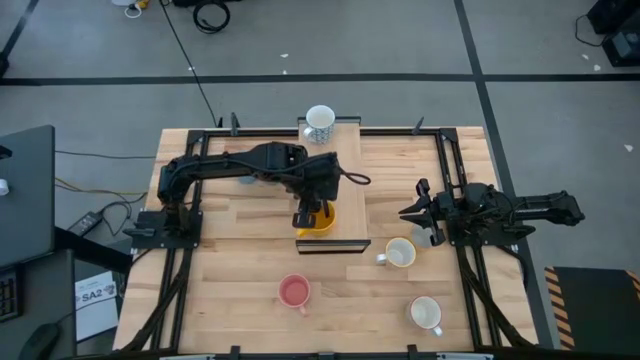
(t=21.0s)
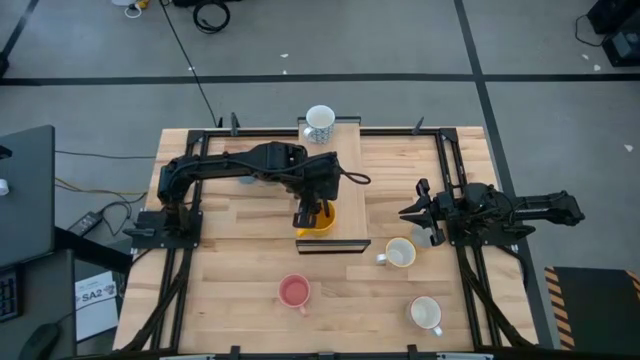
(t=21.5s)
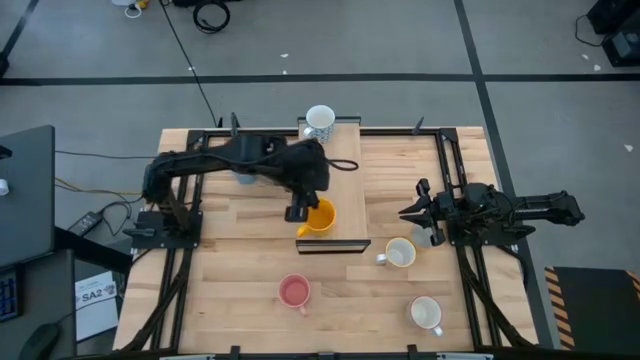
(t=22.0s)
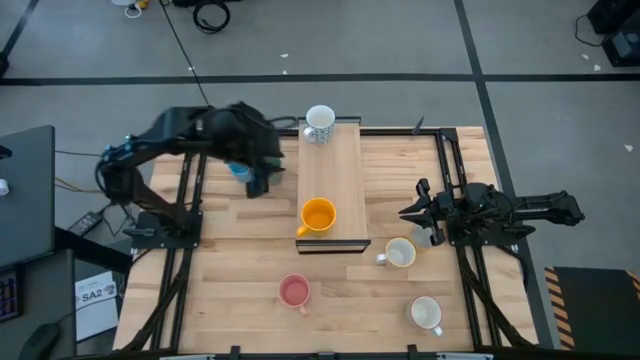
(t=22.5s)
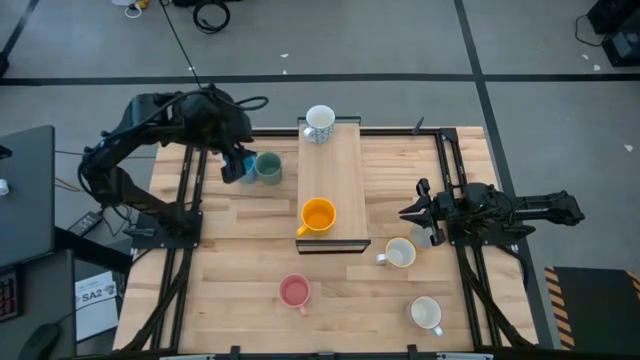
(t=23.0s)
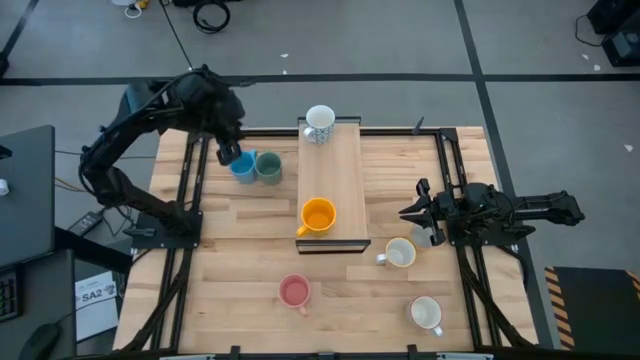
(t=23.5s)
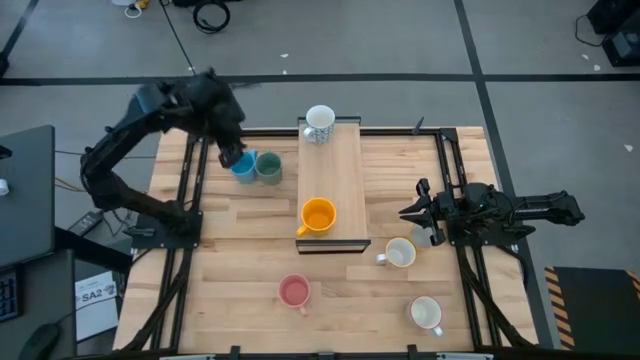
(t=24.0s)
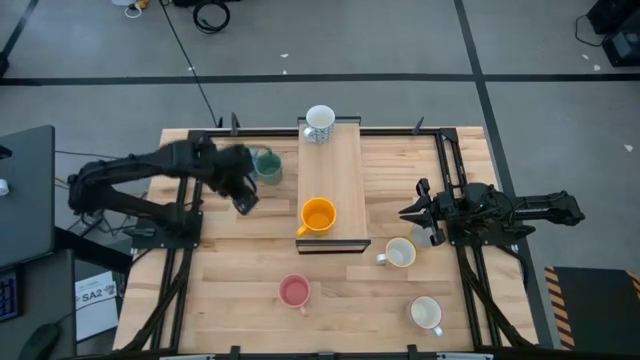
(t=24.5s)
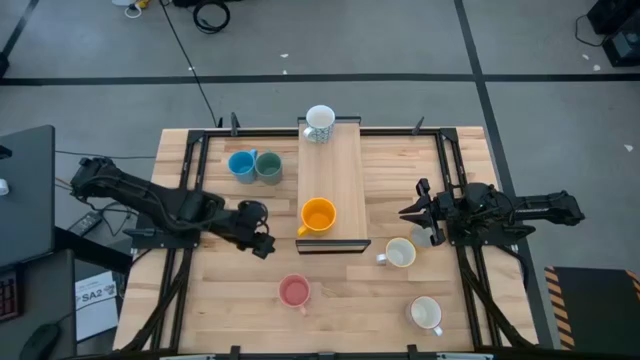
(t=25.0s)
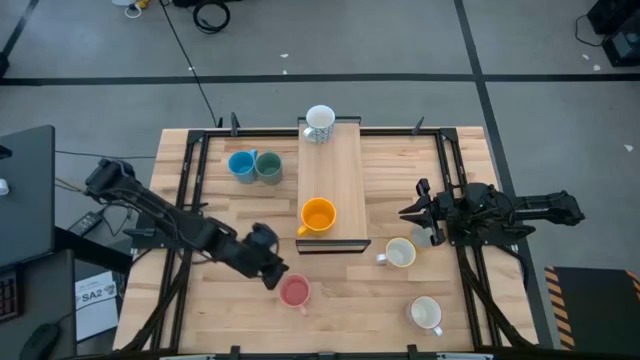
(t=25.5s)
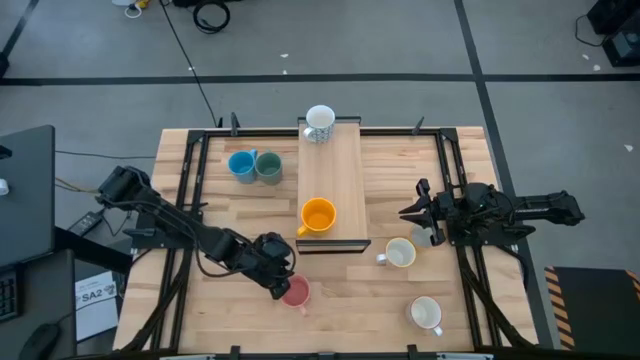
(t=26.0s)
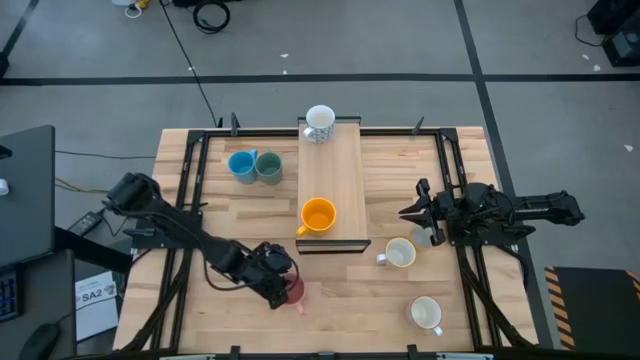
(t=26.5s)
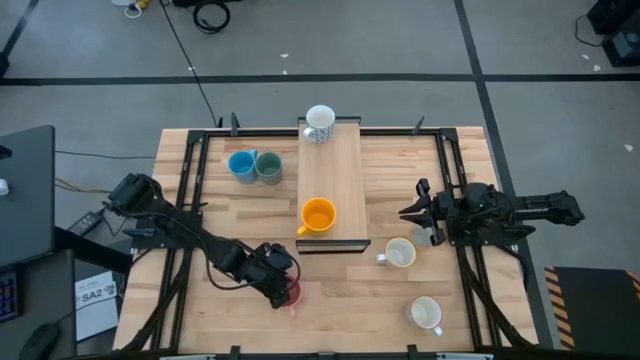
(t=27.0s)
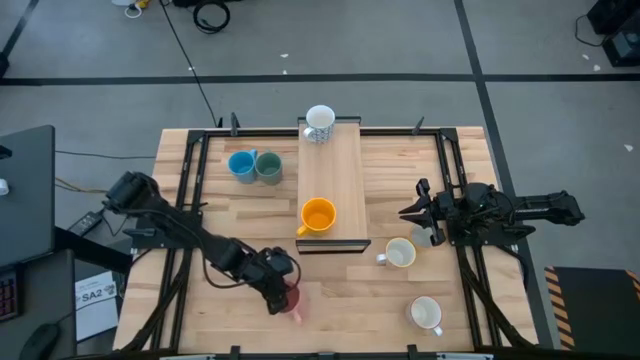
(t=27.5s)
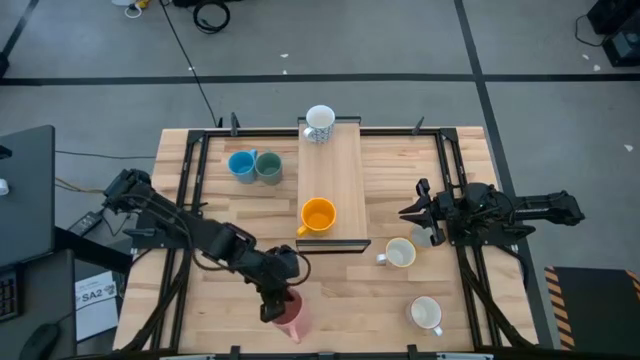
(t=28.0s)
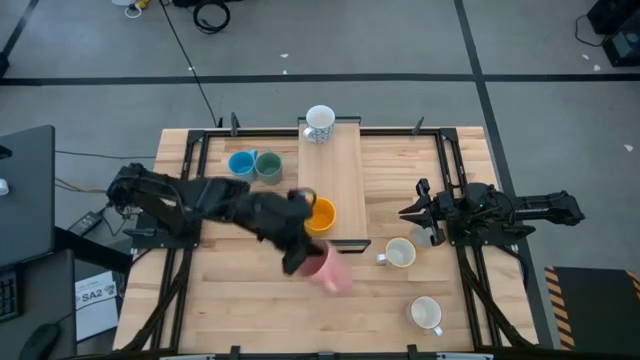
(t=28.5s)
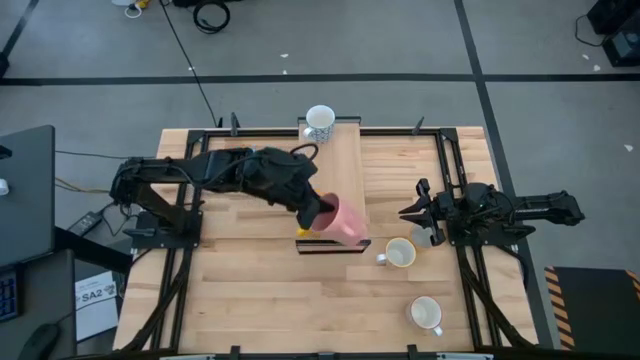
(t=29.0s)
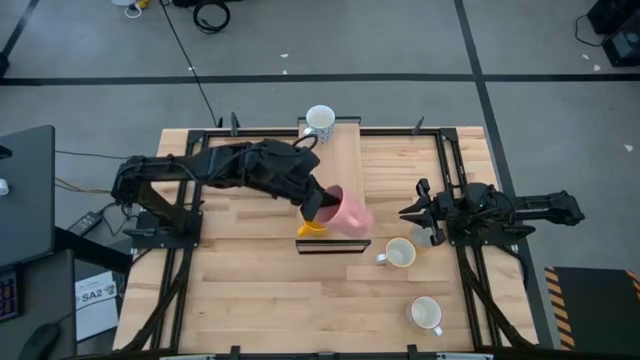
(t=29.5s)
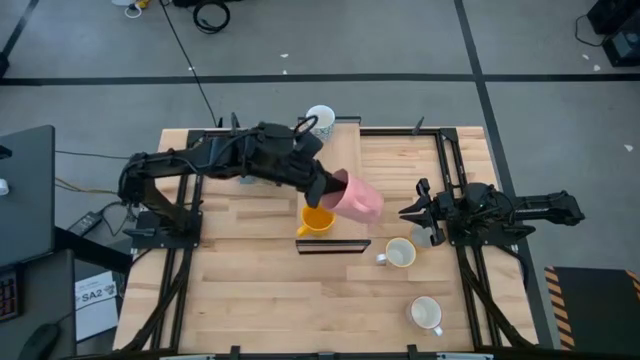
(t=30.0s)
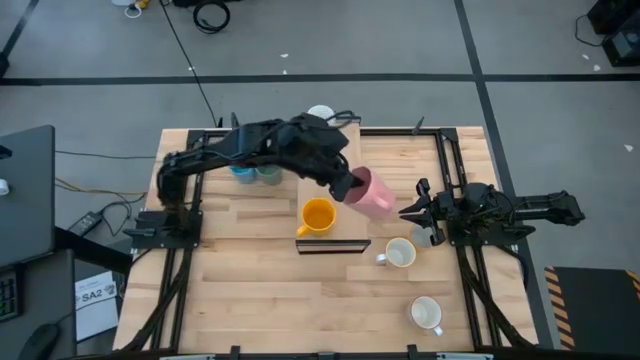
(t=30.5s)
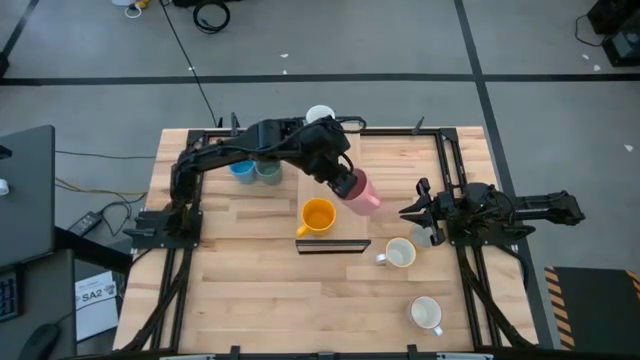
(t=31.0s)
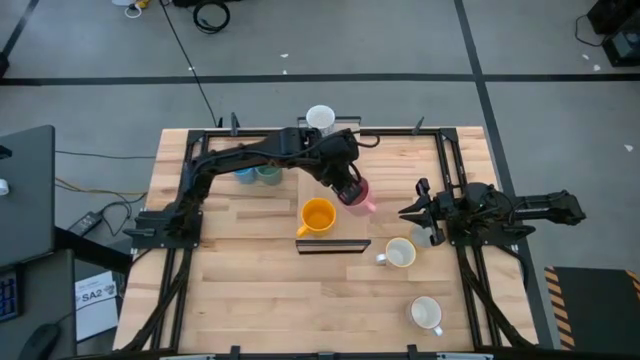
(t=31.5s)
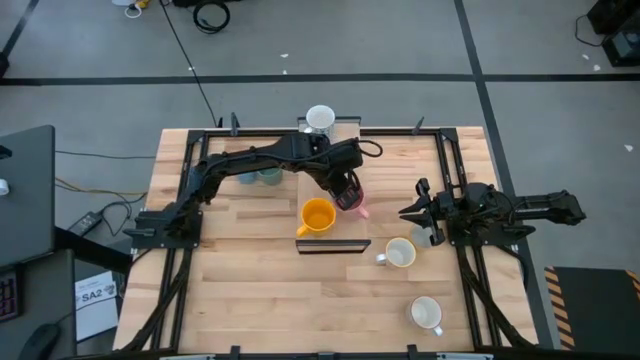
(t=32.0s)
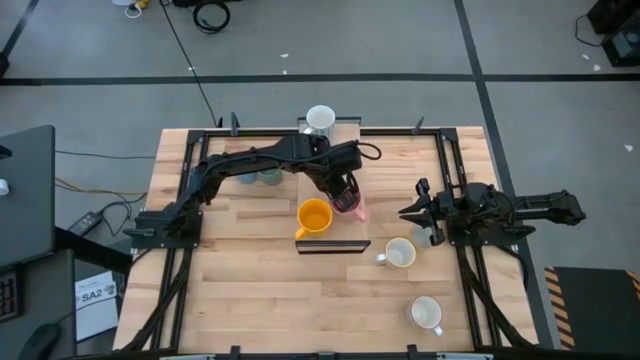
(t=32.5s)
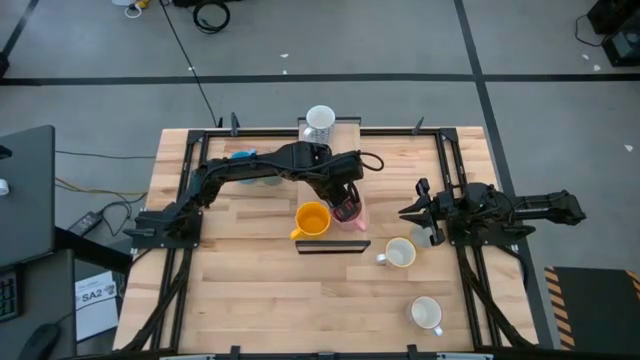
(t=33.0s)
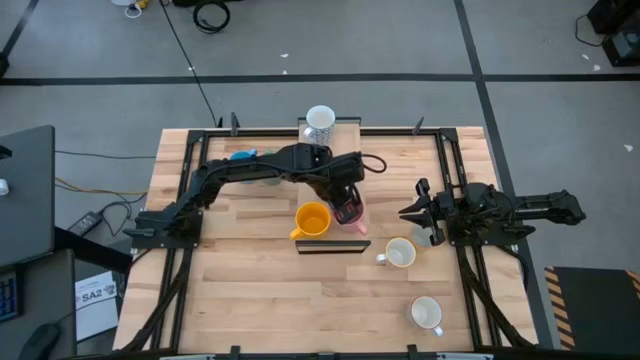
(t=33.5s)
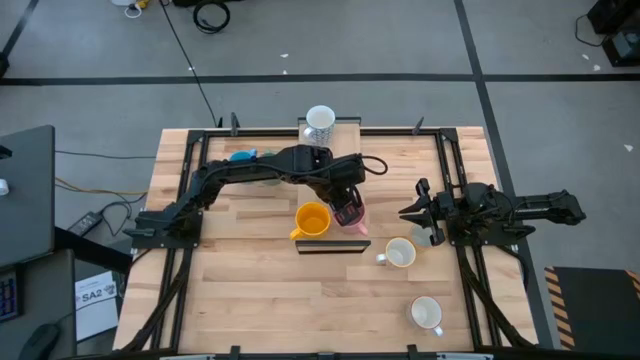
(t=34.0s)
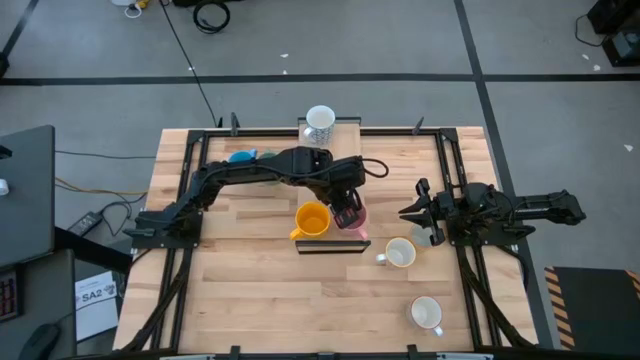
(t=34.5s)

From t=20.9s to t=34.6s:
Task: Place coffee mugs
Put the pink mug on the shelf

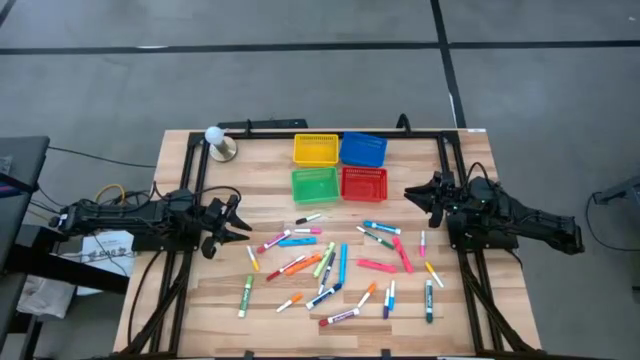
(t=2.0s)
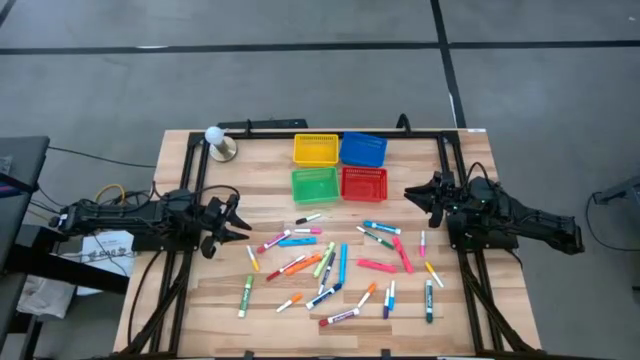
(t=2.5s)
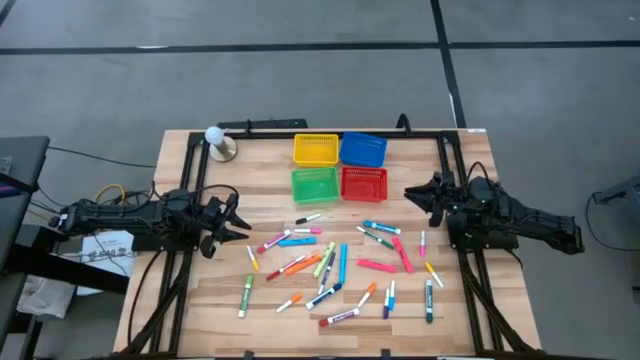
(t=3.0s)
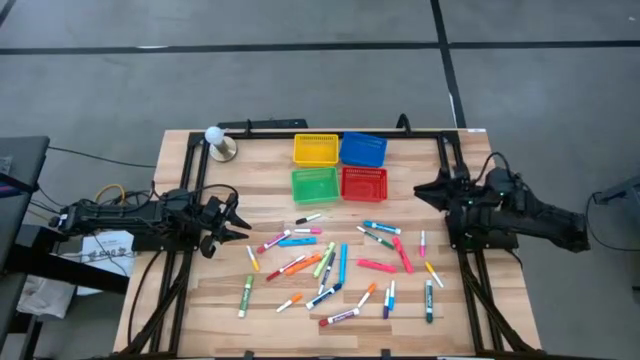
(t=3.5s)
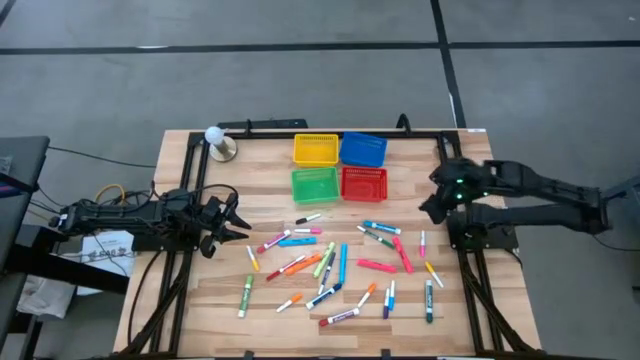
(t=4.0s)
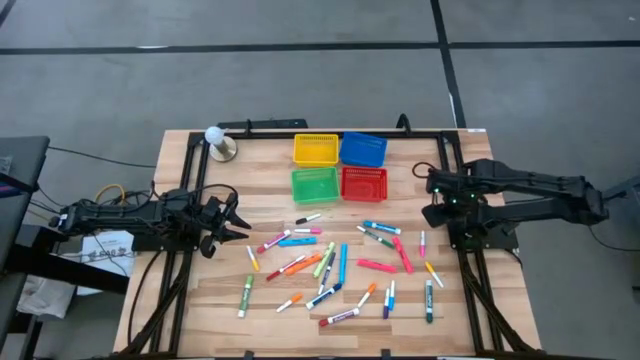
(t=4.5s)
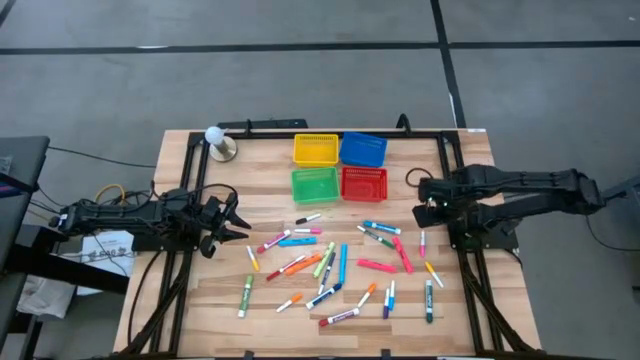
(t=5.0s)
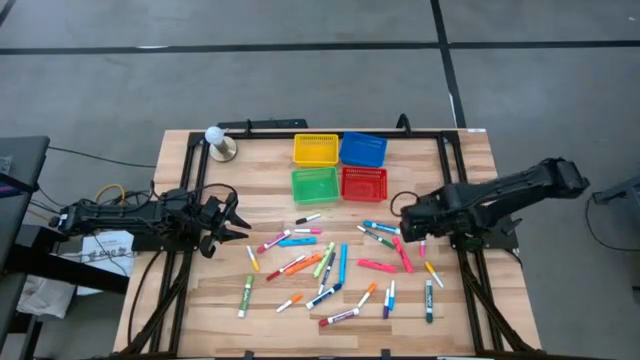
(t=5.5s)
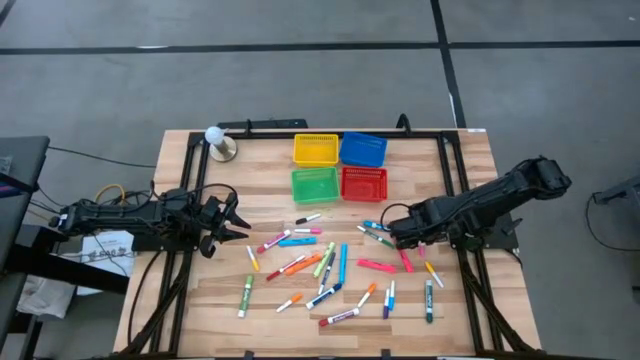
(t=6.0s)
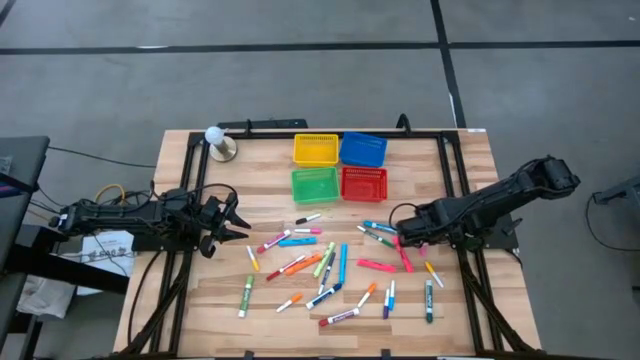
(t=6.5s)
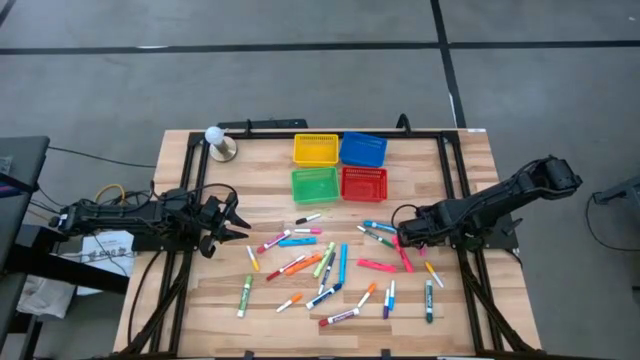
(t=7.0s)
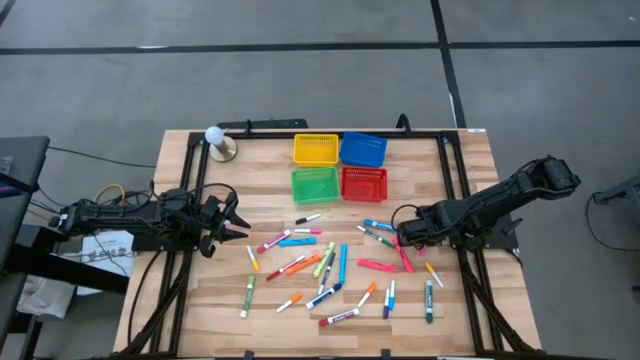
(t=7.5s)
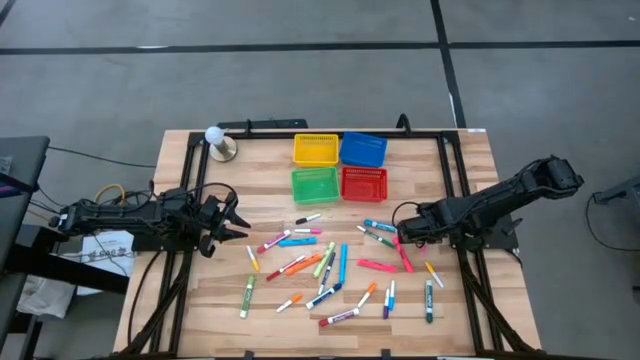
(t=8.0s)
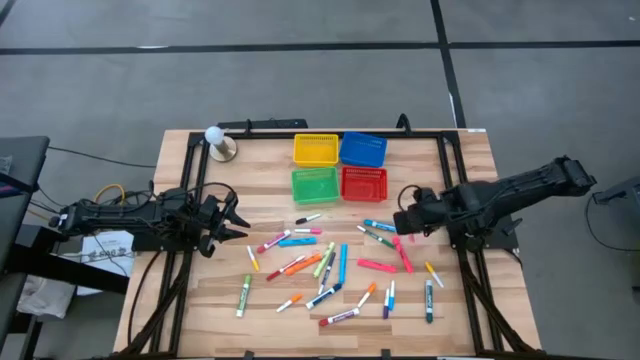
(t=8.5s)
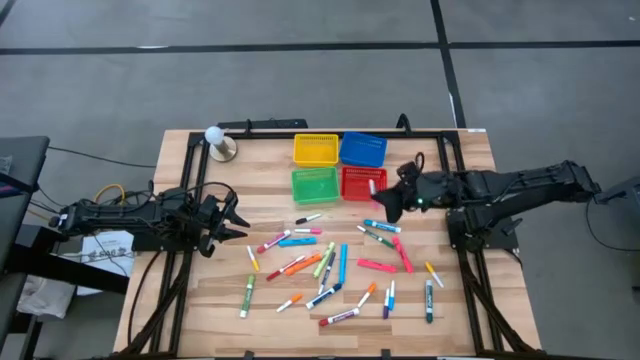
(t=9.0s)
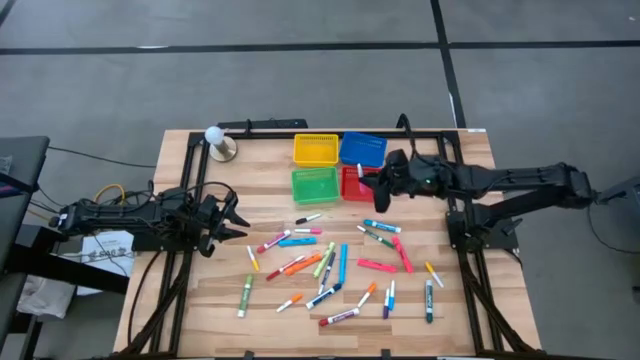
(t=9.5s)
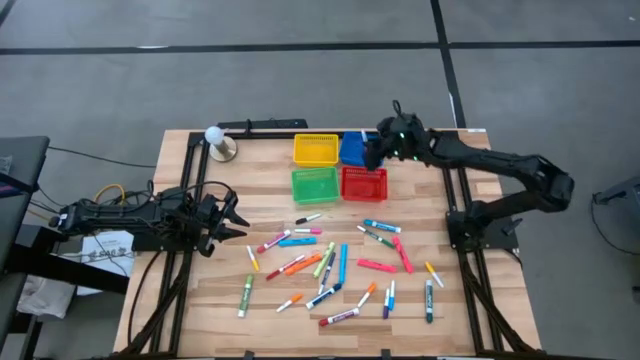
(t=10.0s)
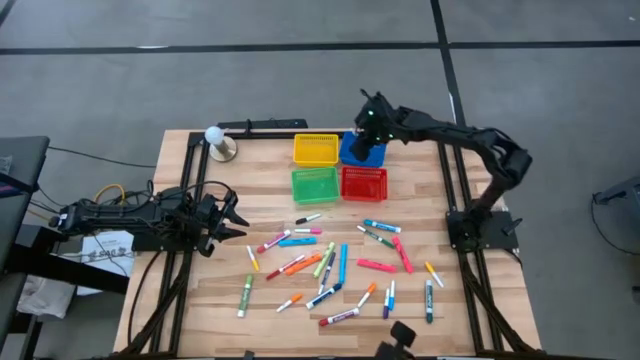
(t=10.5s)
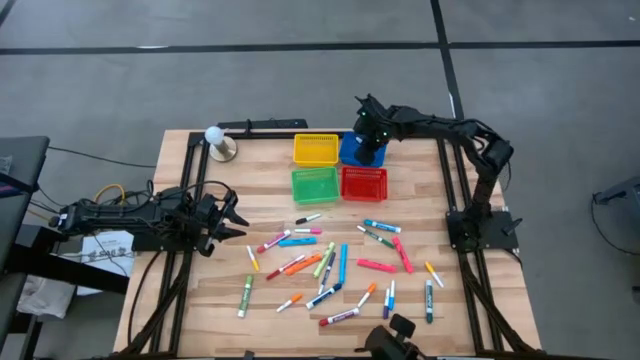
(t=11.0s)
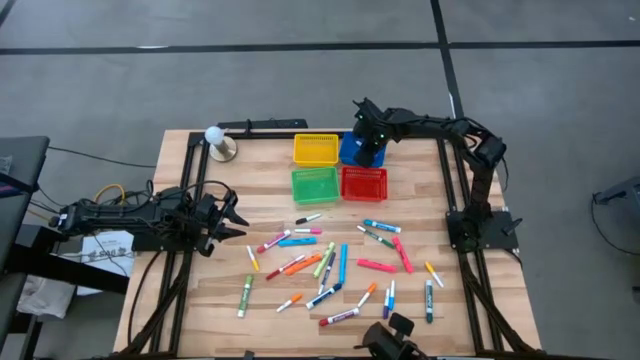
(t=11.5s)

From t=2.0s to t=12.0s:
Task: Pick & Place Markers
Put the pink mini marker into the blue bin
